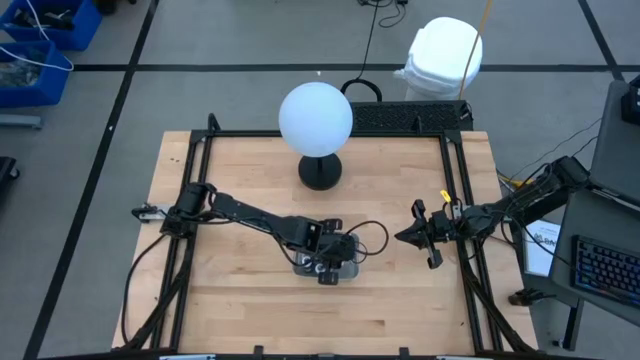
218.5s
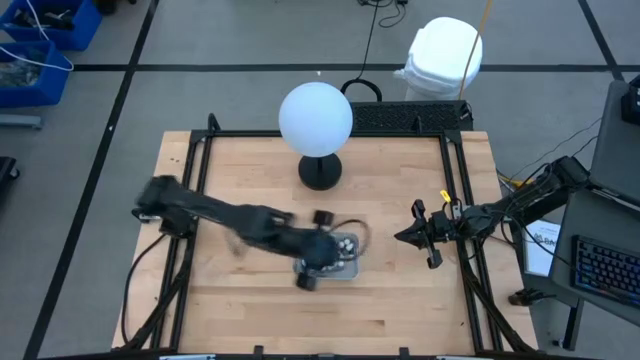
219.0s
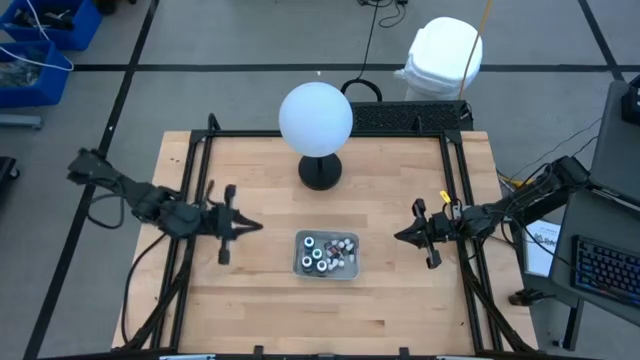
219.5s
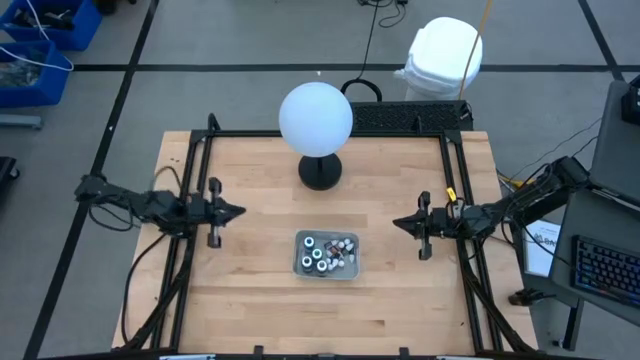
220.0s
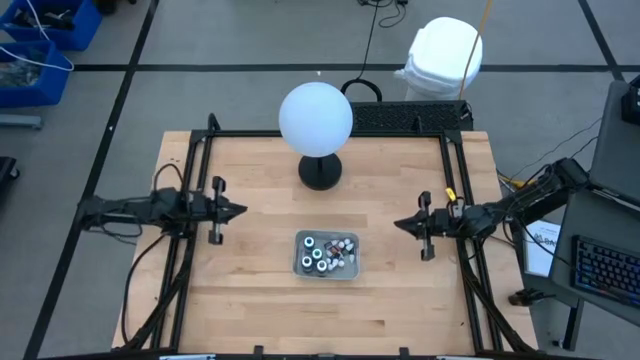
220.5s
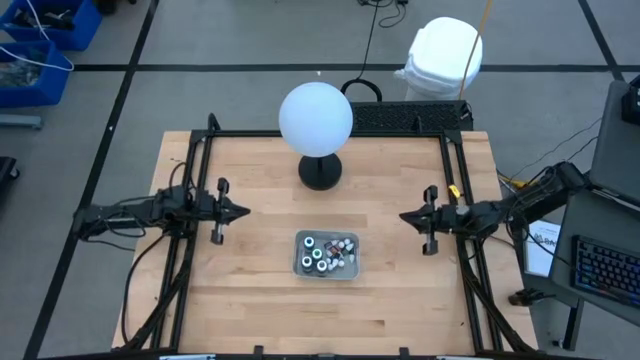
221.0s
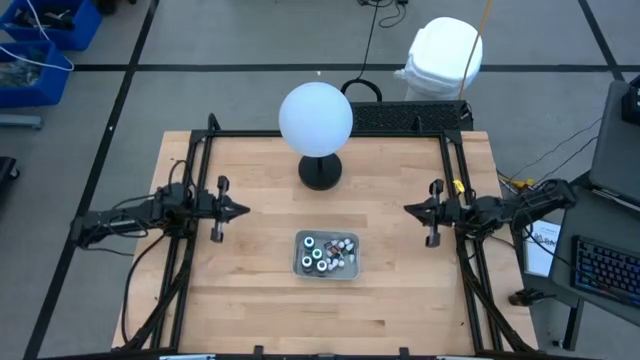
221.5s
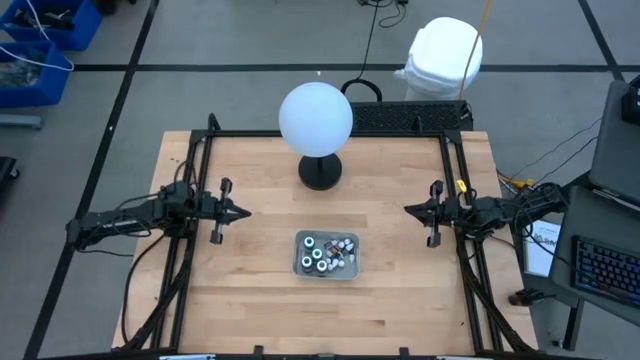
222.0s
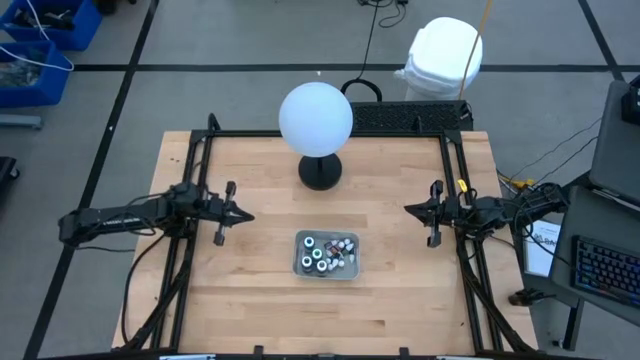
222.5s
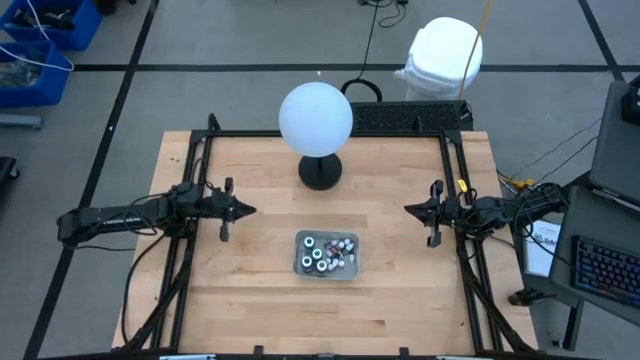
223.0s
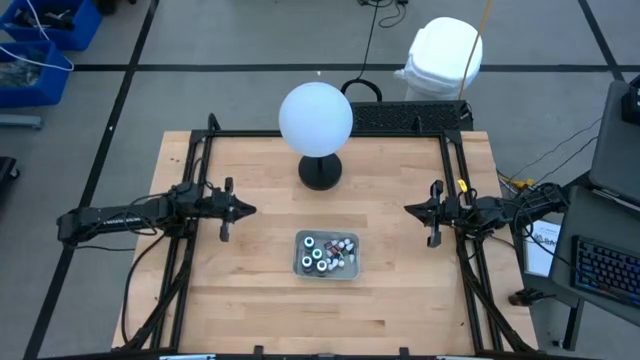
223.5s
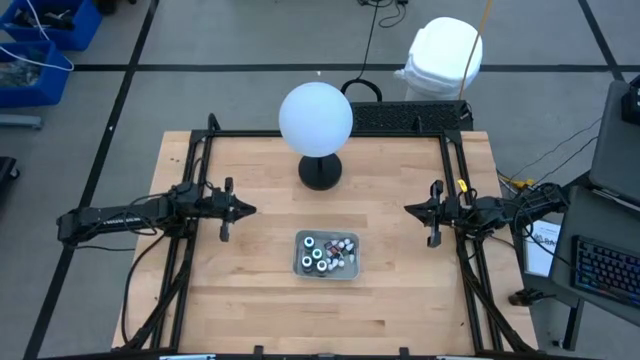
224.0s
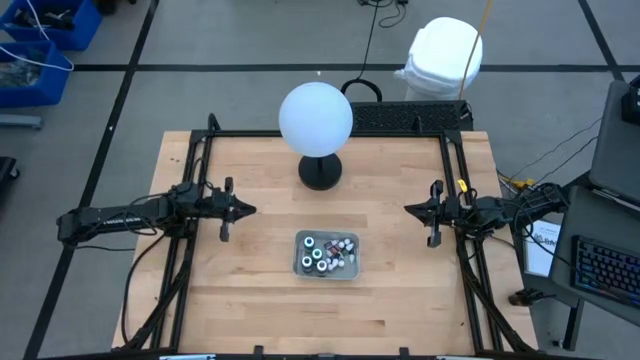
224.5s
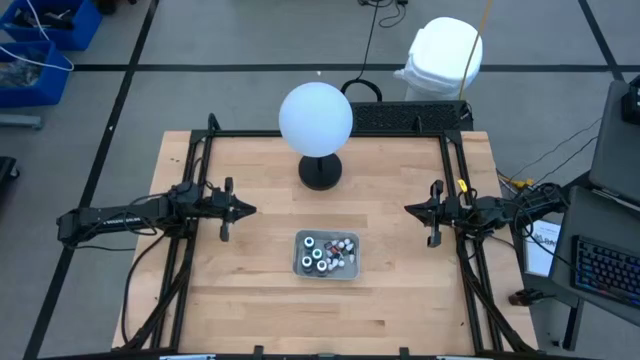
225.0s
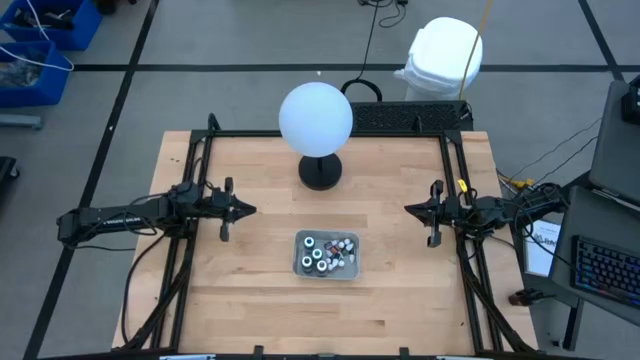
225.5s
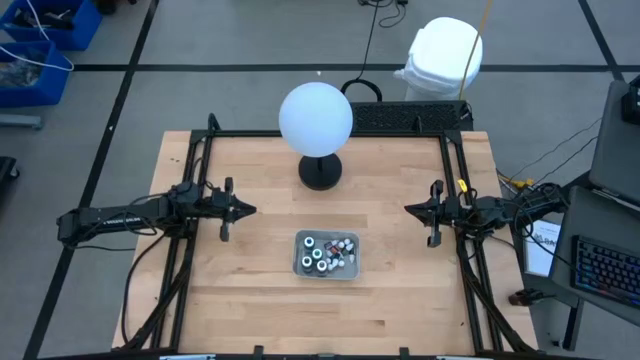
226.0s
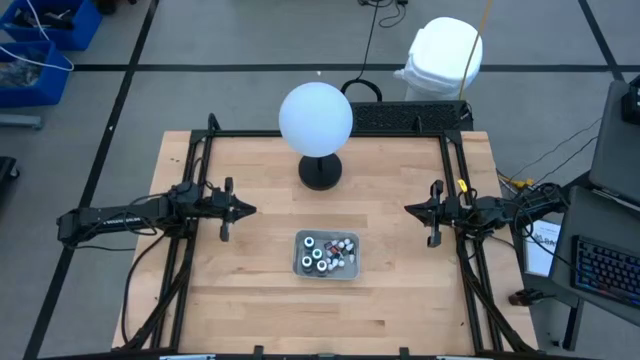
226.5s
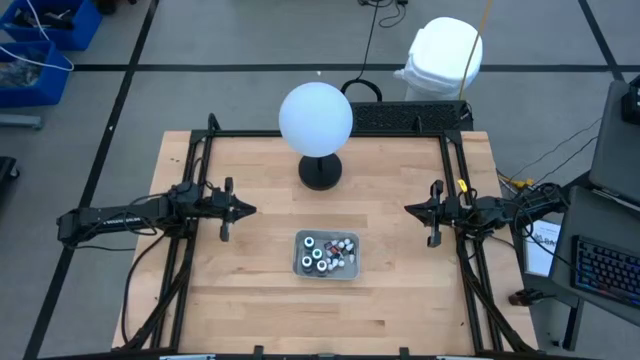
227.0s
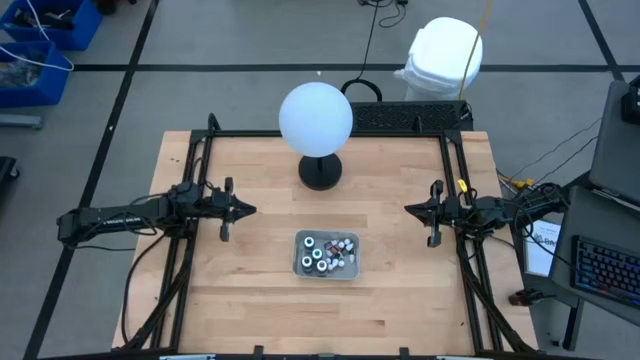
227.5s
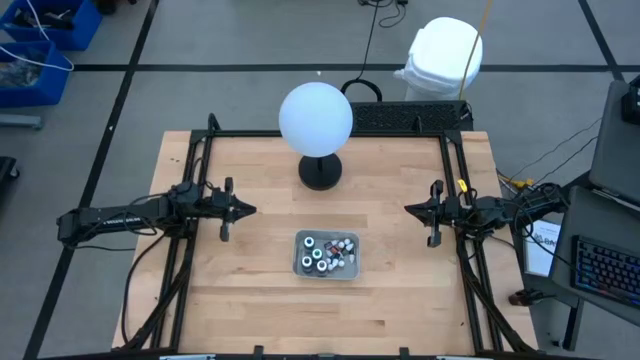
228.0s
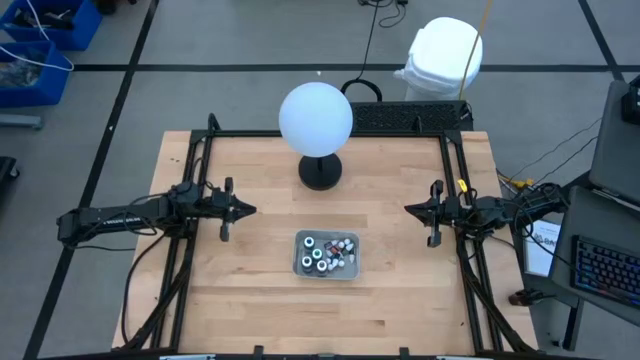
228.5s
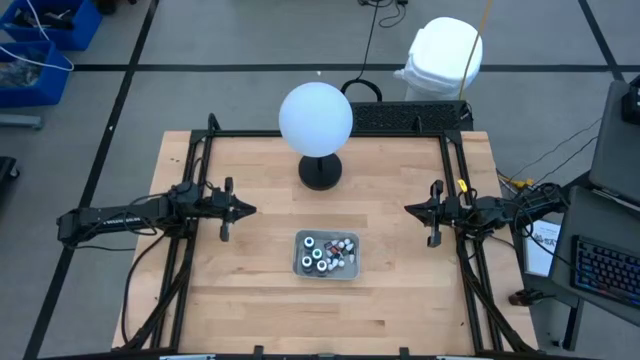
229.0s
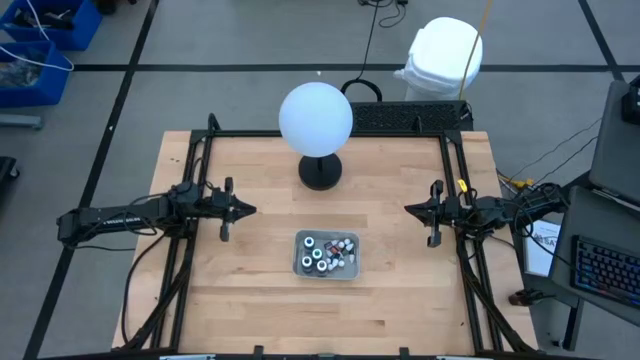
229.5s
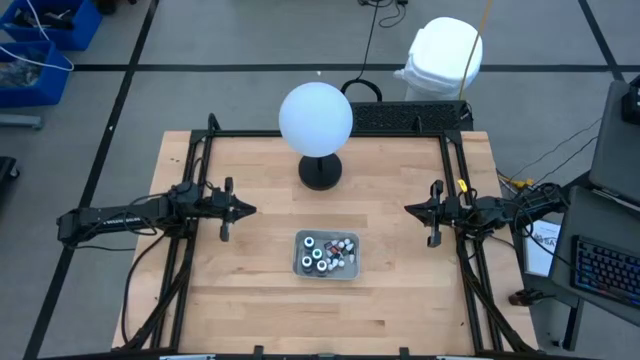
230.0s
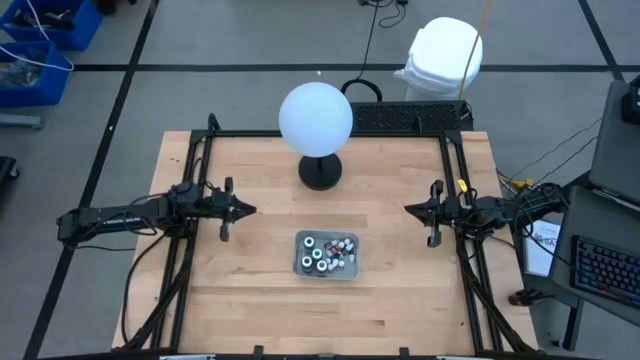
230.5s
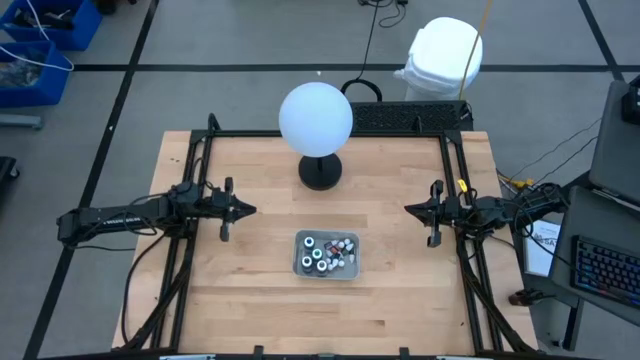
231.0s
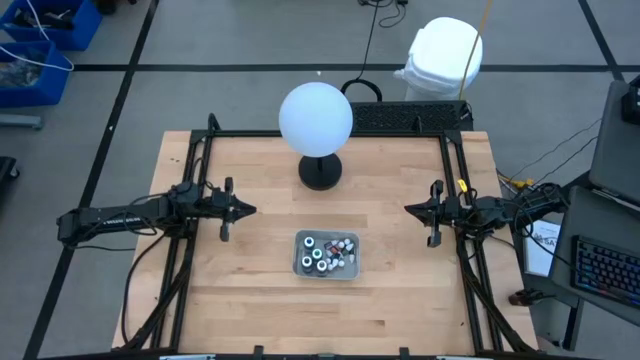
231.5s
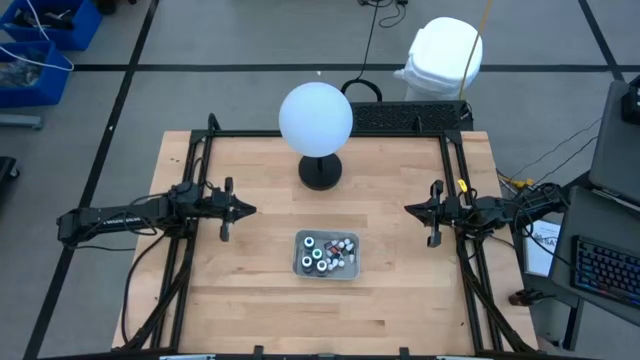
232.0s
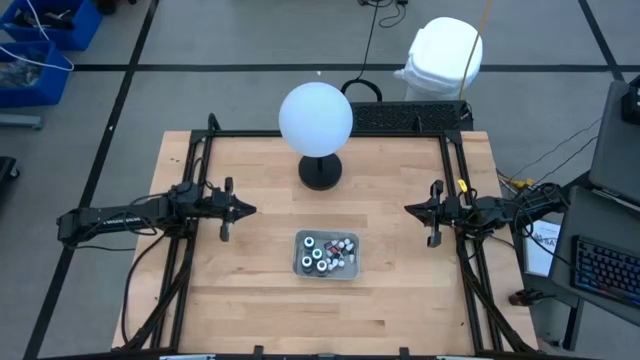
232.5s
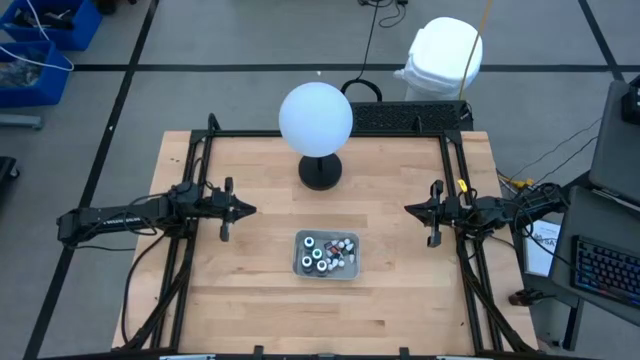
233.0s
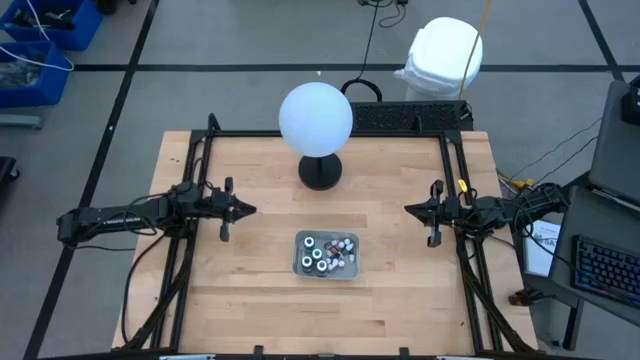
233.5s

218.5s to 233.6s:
Task: Pick & Place food coloring
Return To Home Position

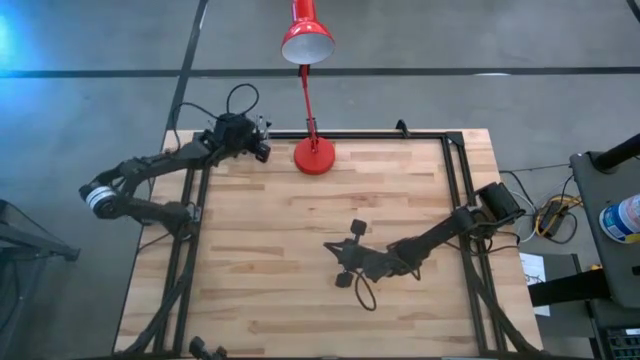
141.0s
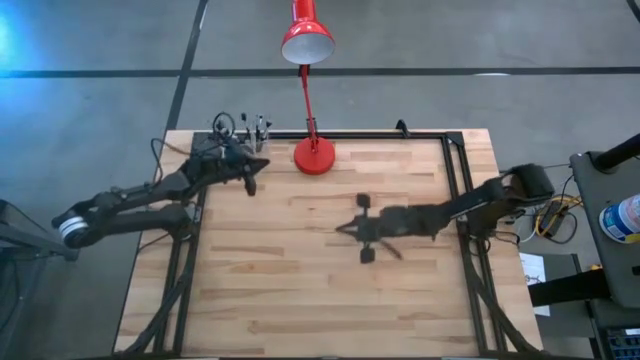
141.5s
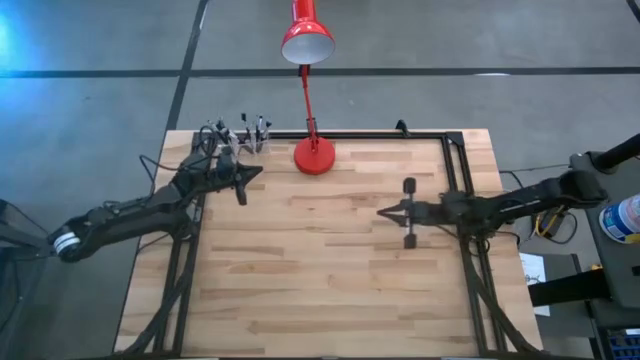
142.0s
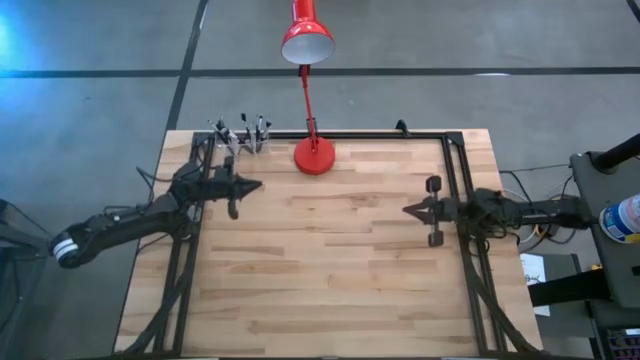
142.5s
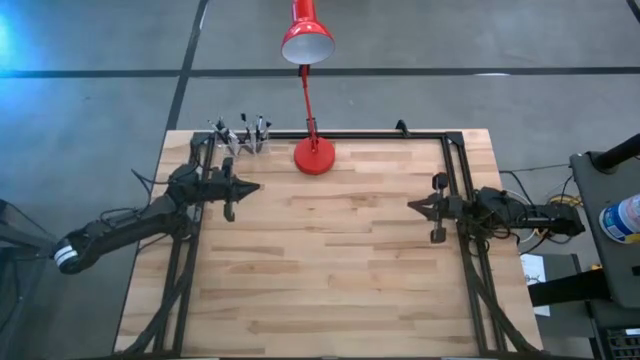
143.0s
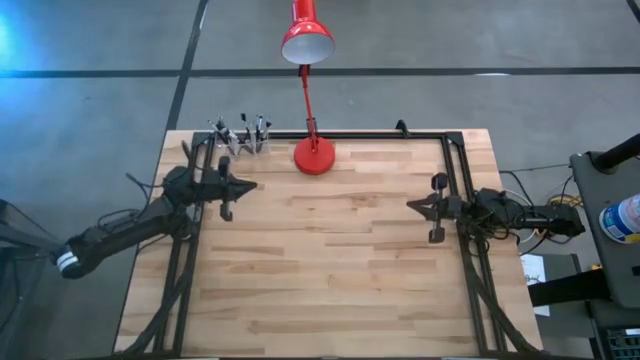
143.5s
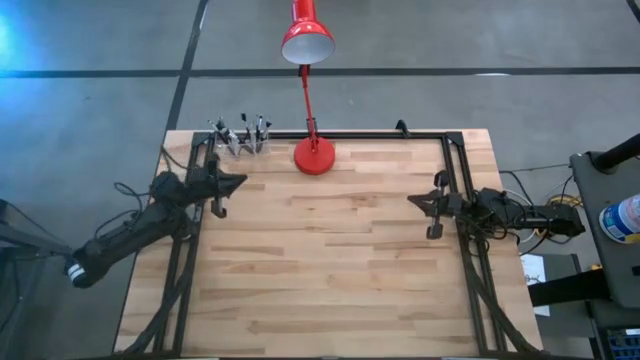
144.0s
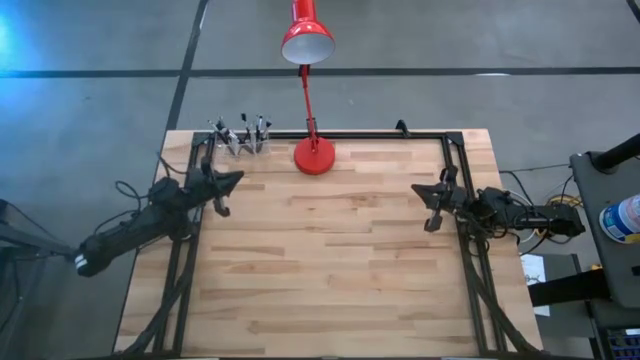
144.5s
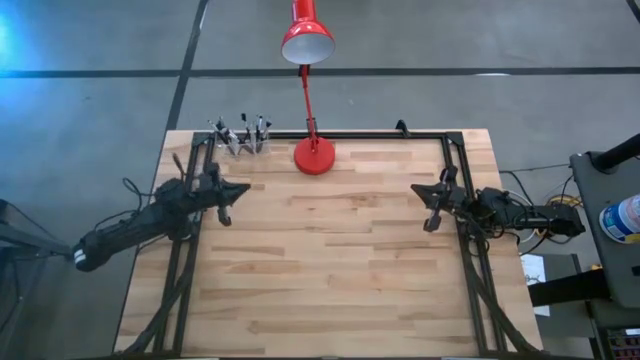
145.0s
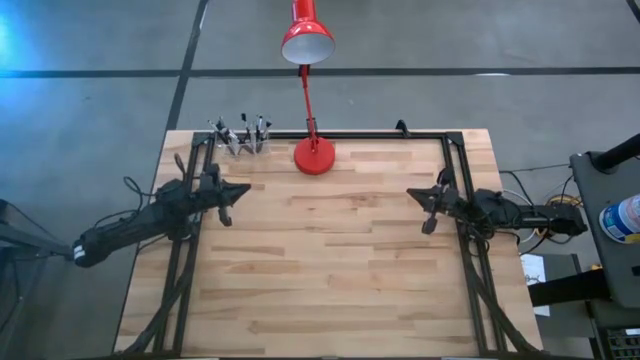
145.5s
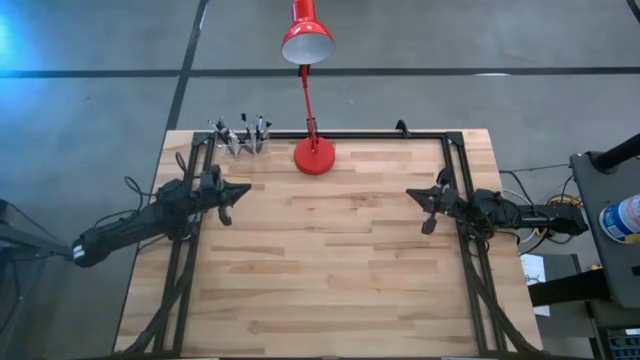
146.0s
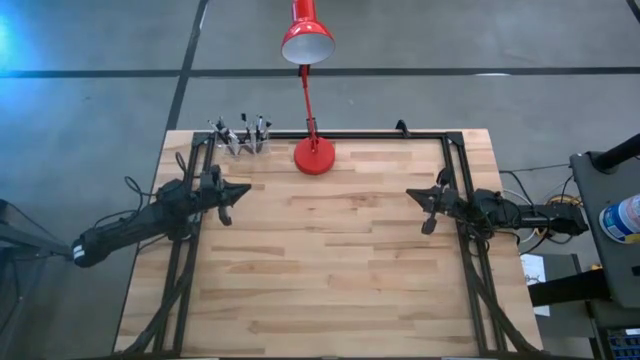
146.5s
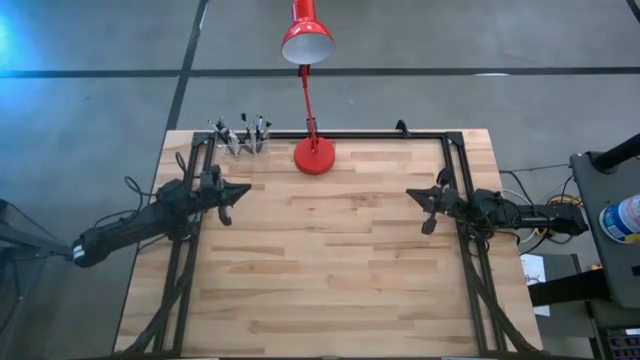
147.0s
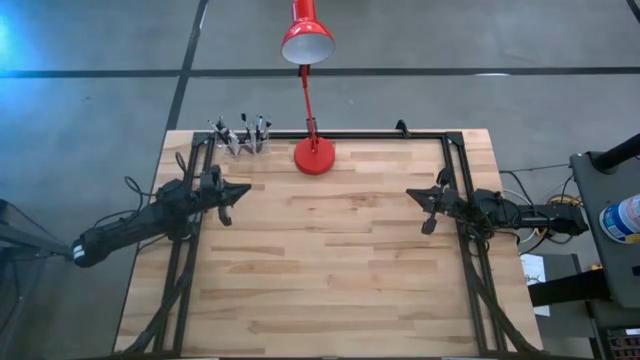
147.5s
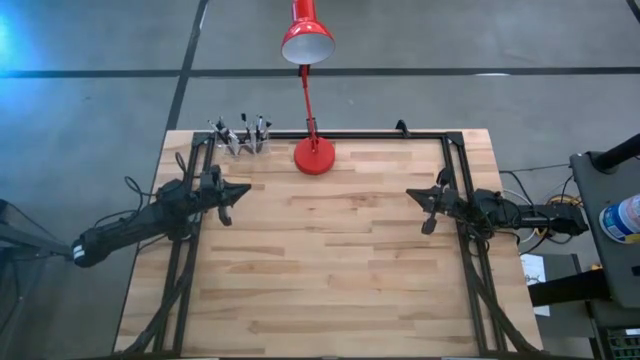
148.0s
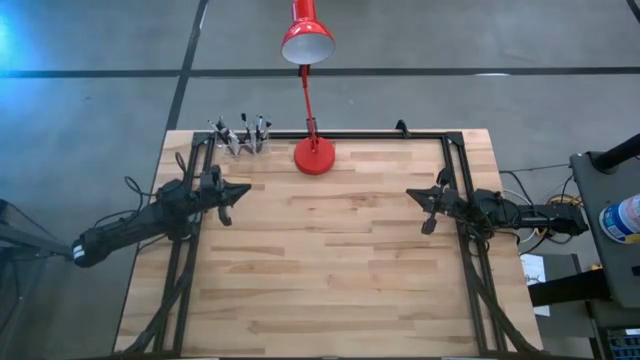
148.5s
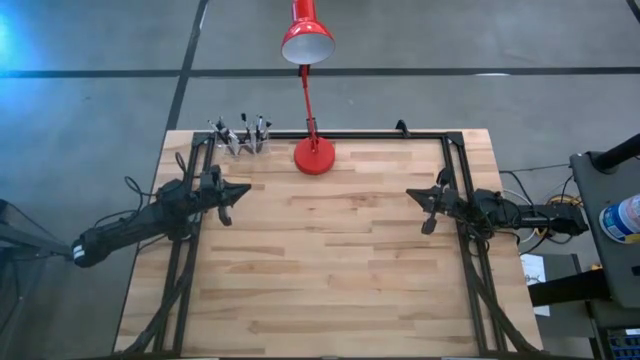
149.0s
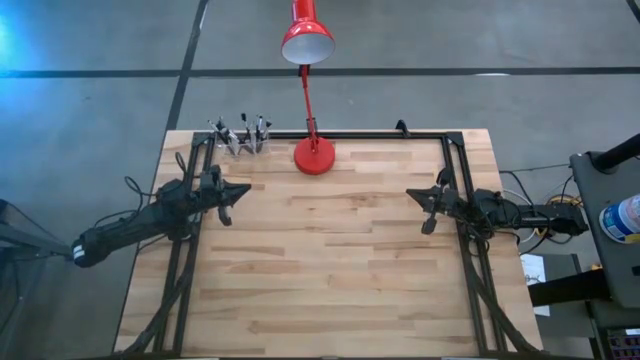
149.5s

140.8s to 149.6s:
Task: Pick & Place Makeup Supplies
Return to Home Position
